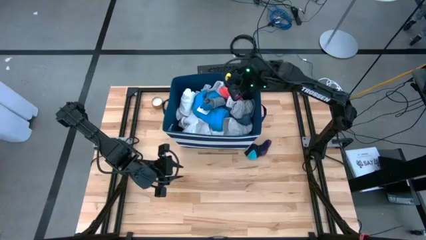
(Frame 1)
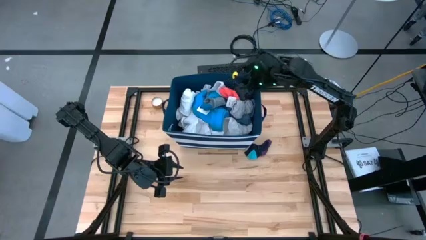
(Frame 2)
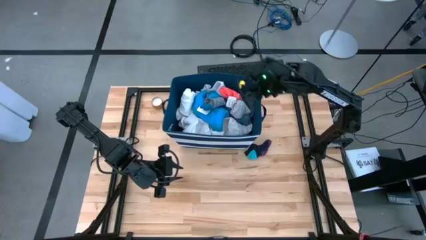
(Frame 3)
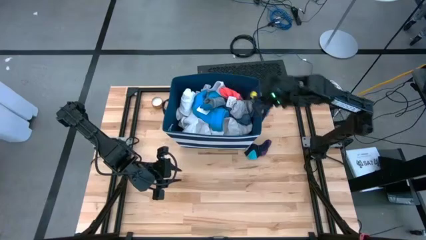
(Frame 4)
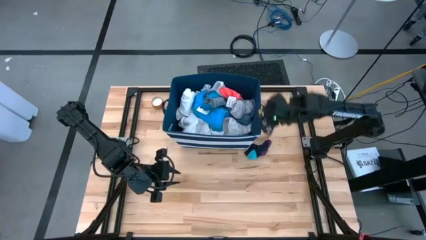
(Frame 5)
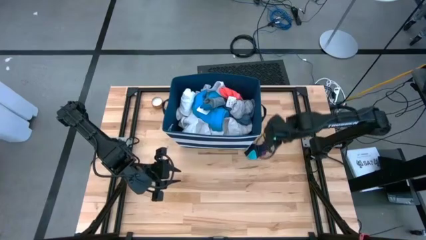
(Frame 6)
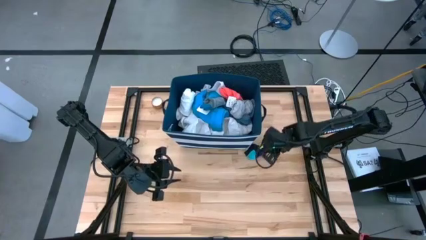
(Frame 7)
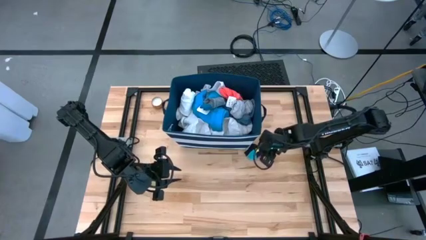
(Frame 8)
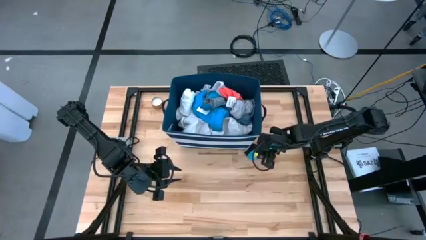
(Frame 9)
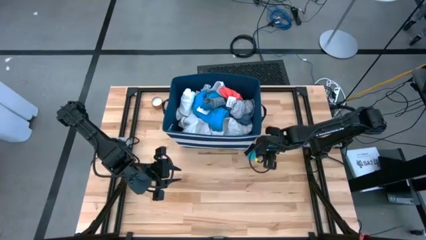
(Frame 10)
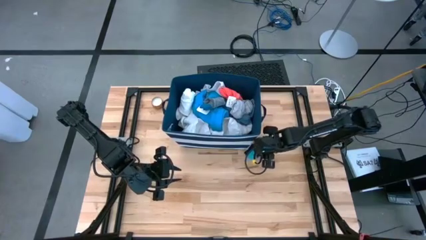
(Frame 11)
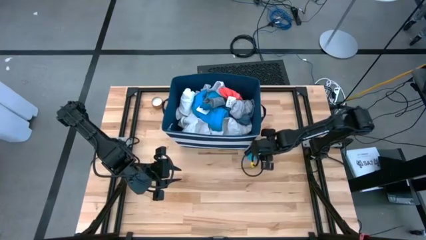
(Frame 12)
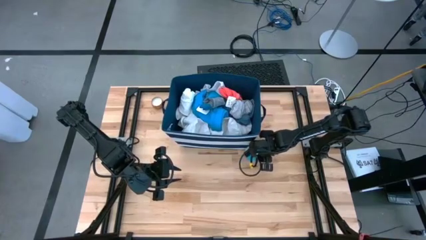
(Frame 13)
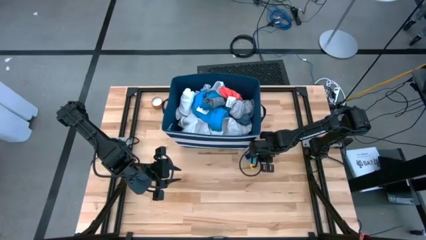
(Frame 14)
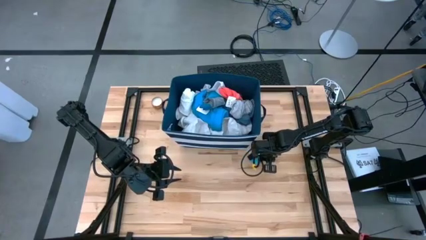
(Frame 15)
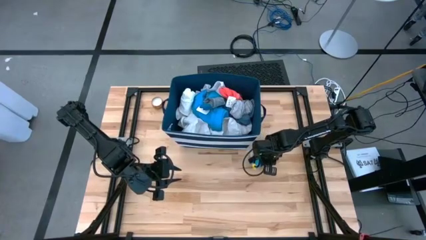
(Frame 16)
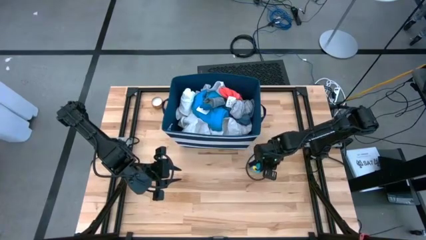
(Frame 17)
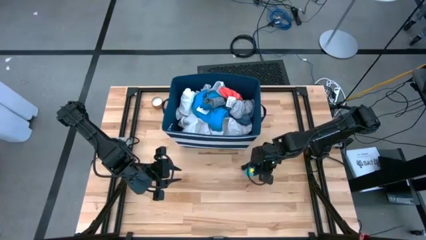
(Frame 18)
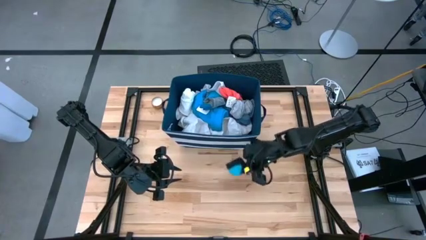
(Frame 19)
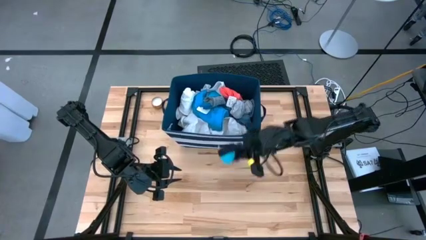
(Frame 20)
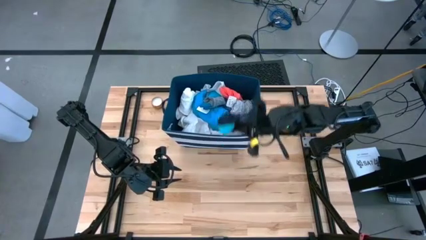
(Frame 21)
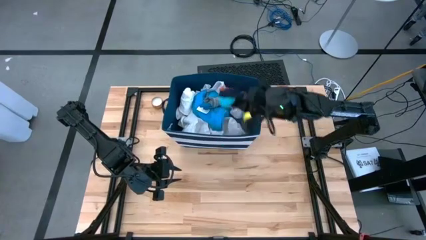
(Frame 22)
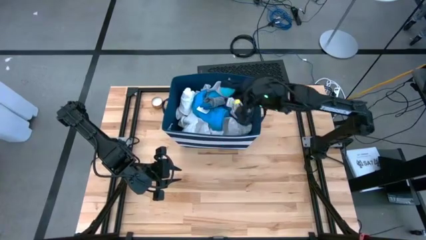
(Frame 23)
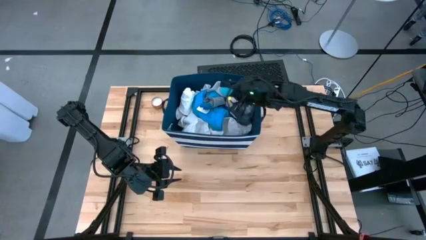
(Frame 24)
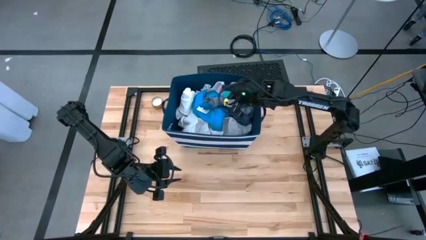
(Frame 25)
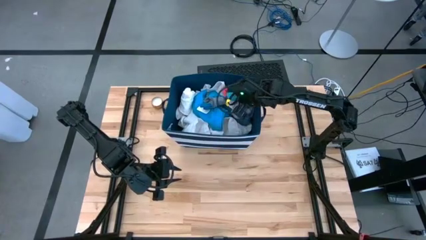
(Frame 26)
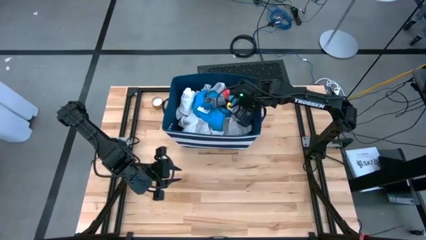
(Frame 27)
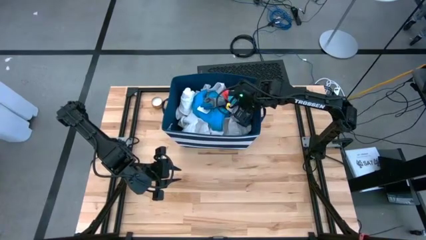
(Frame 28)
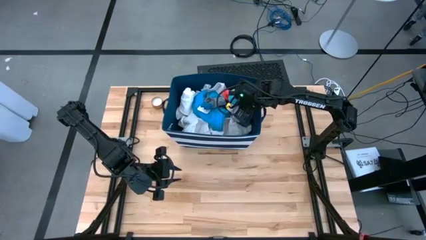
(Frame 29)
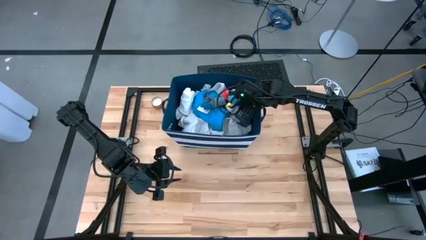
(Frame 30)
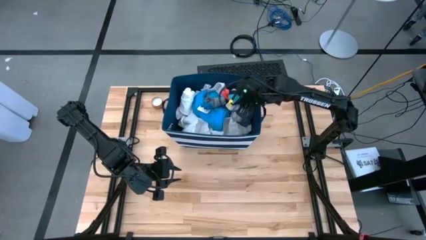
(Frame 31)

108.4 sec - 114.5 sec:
Task: Sort clothes
Put the dark blue sock into the white and blue laundry organizer

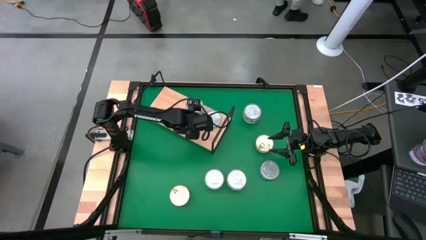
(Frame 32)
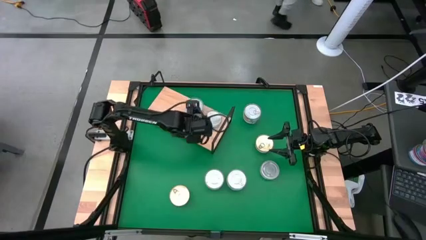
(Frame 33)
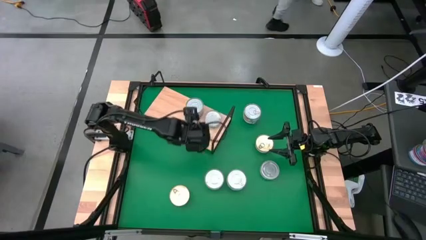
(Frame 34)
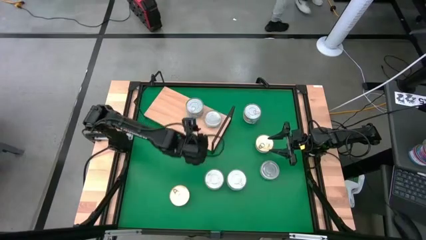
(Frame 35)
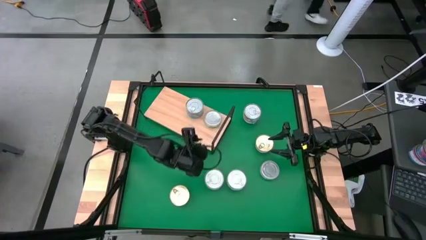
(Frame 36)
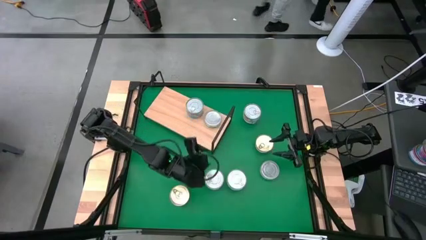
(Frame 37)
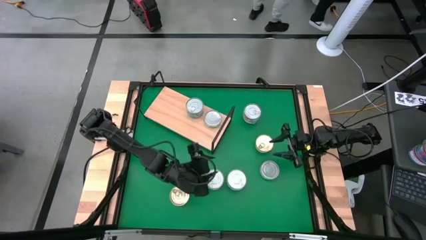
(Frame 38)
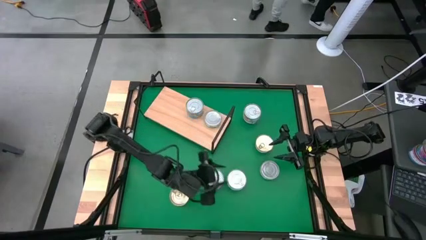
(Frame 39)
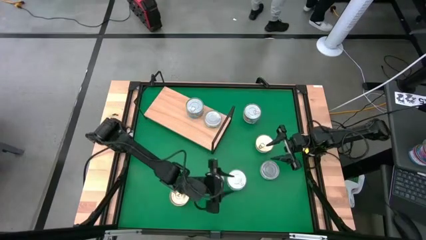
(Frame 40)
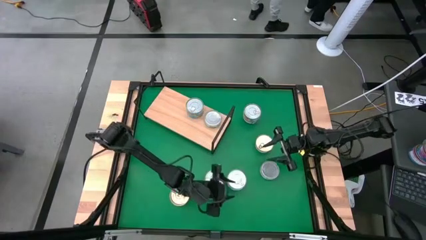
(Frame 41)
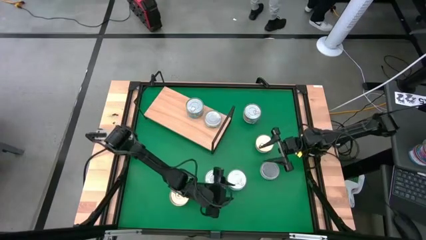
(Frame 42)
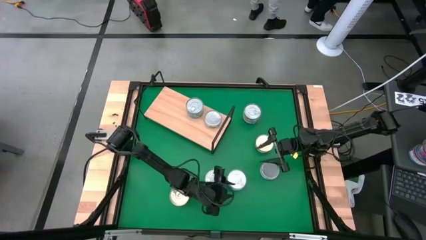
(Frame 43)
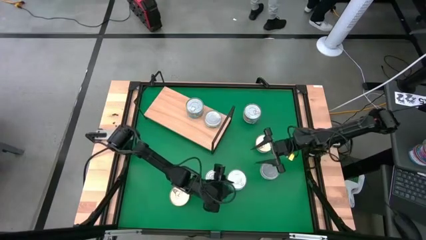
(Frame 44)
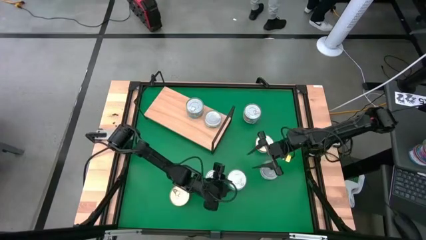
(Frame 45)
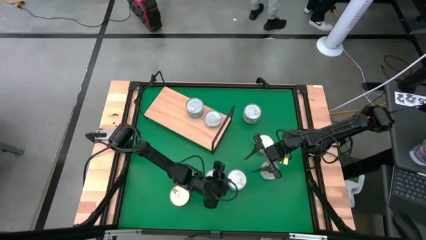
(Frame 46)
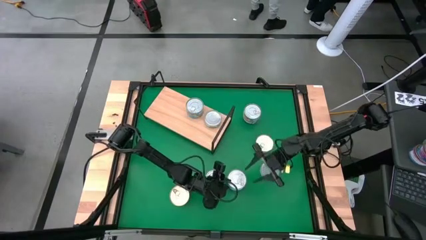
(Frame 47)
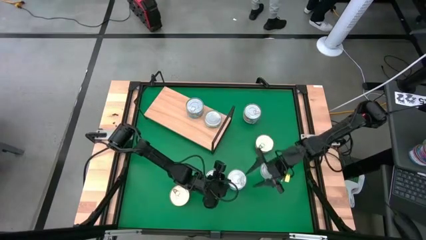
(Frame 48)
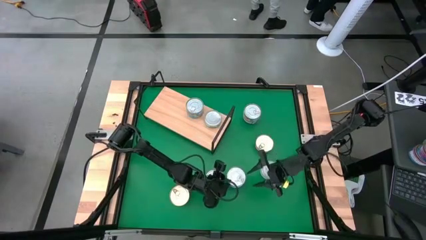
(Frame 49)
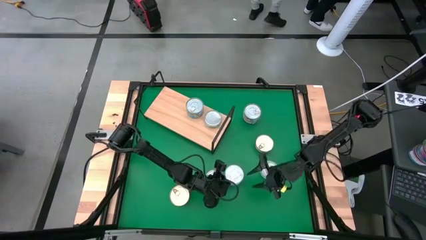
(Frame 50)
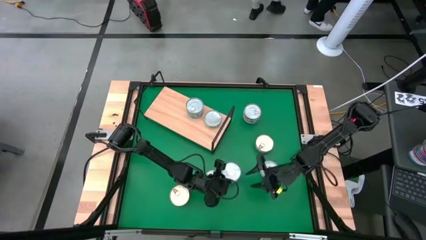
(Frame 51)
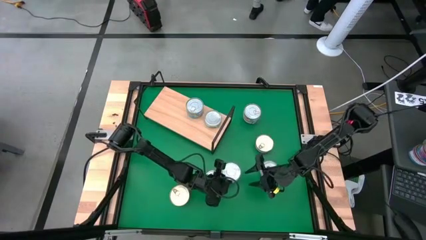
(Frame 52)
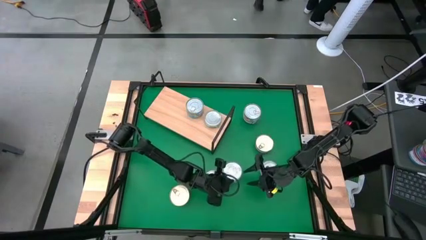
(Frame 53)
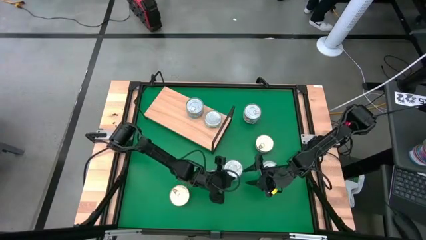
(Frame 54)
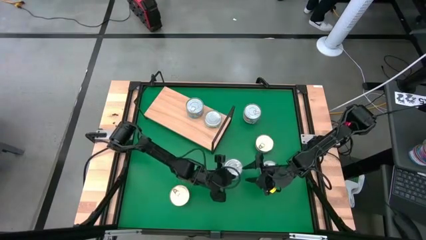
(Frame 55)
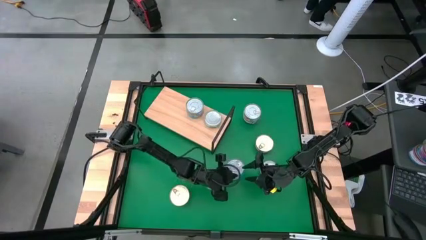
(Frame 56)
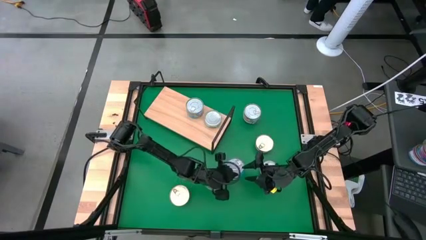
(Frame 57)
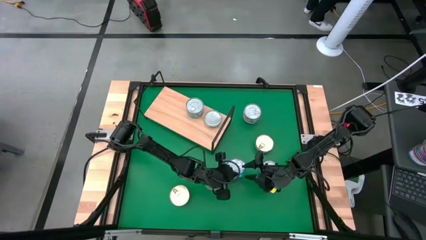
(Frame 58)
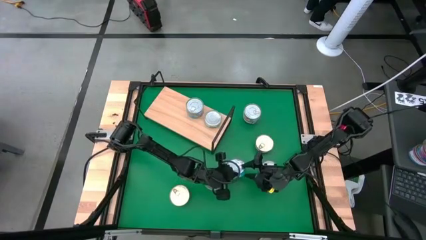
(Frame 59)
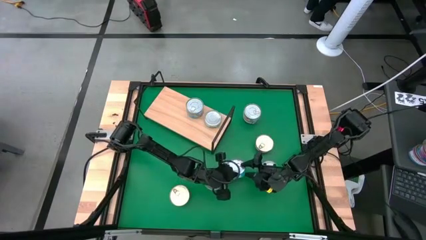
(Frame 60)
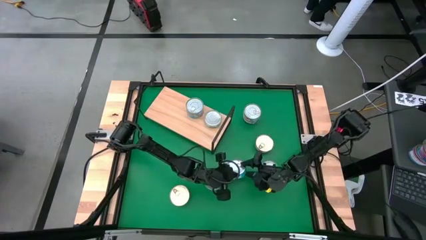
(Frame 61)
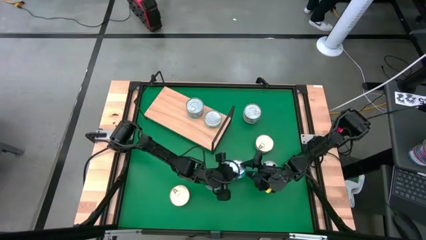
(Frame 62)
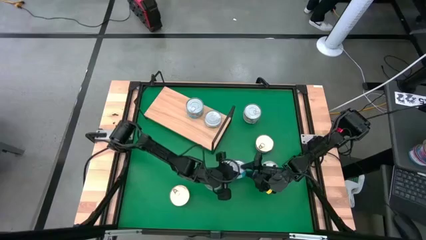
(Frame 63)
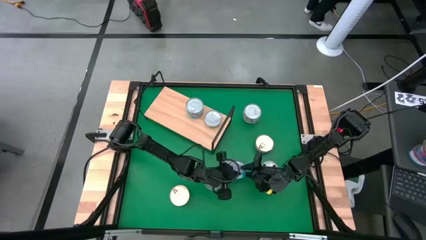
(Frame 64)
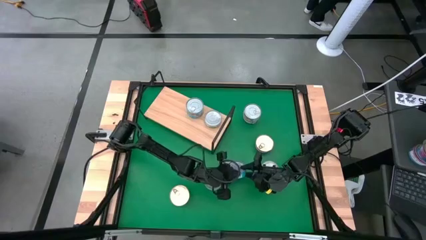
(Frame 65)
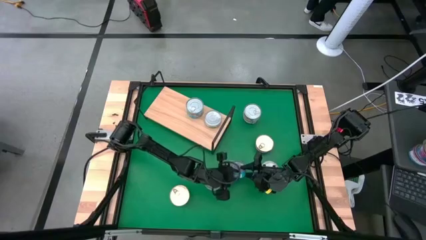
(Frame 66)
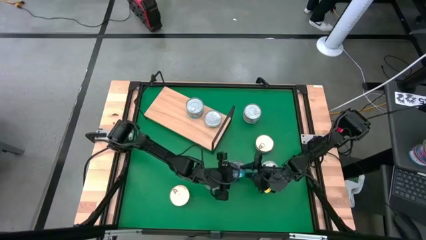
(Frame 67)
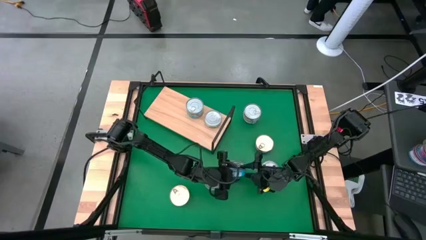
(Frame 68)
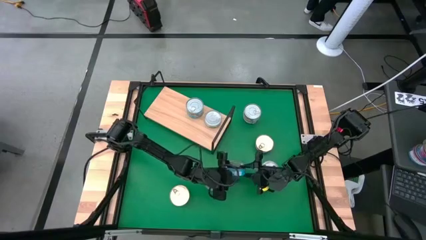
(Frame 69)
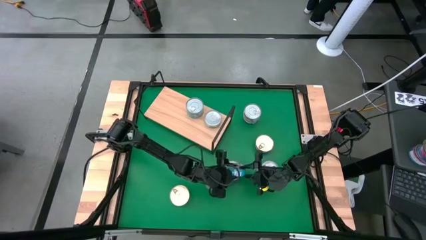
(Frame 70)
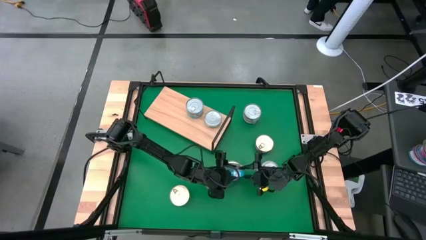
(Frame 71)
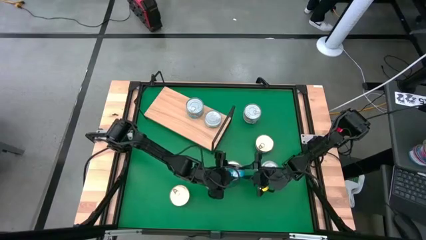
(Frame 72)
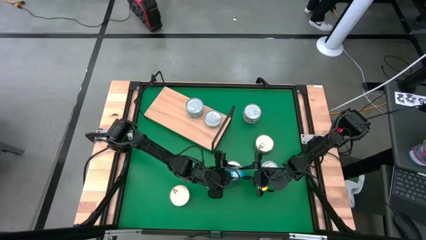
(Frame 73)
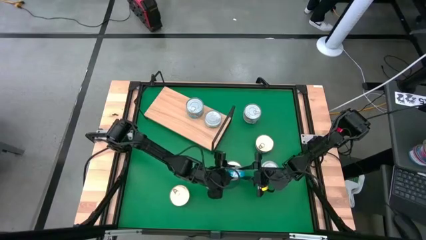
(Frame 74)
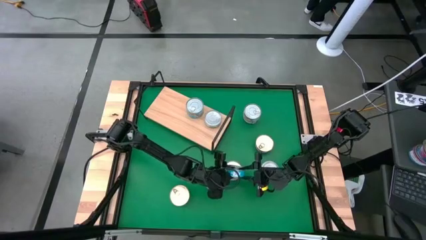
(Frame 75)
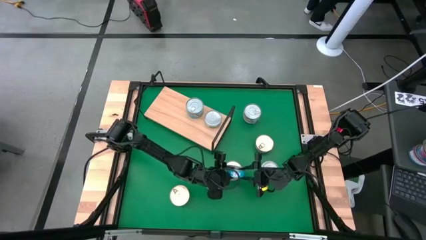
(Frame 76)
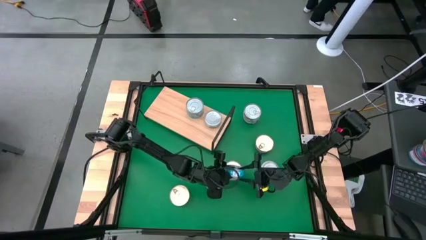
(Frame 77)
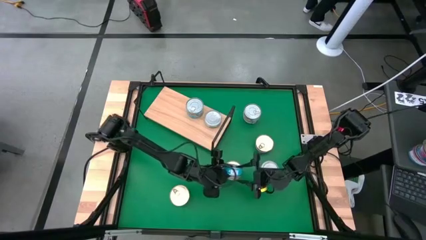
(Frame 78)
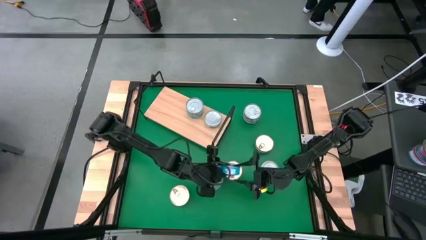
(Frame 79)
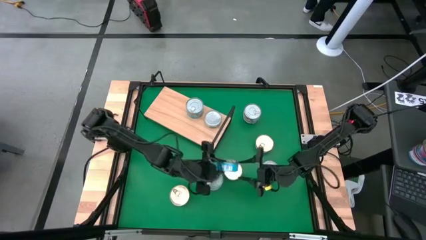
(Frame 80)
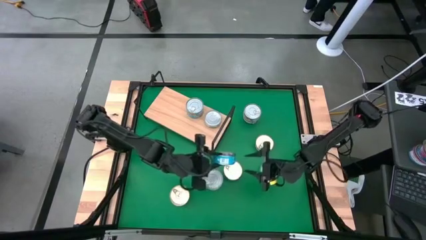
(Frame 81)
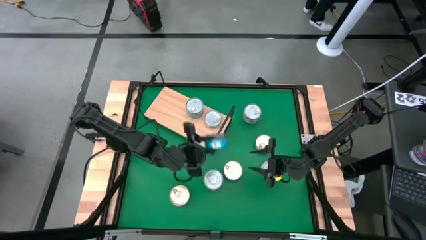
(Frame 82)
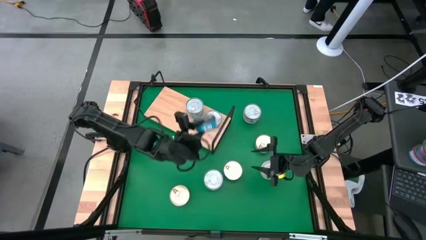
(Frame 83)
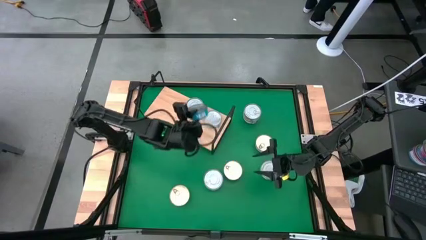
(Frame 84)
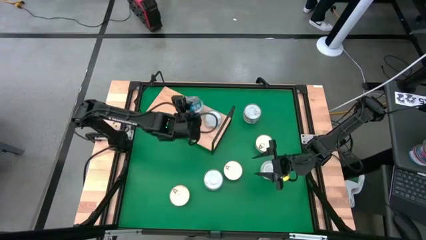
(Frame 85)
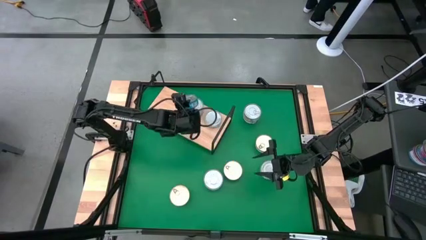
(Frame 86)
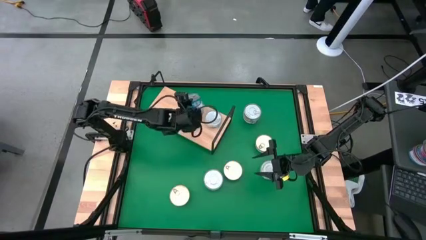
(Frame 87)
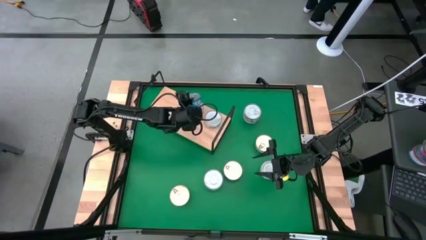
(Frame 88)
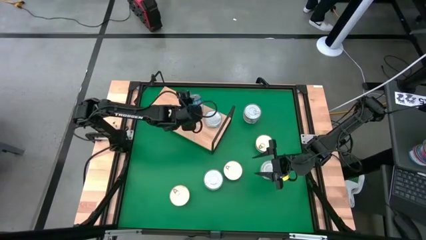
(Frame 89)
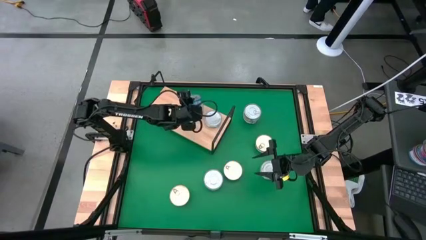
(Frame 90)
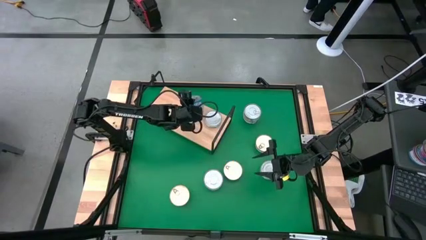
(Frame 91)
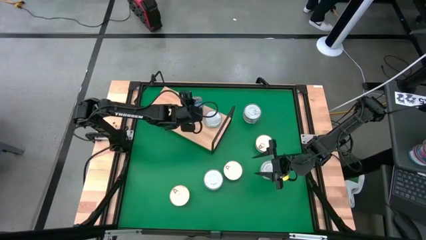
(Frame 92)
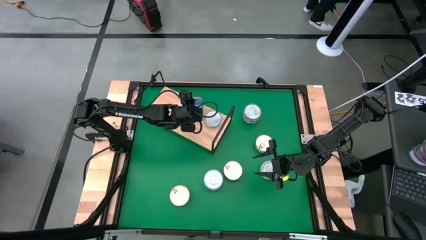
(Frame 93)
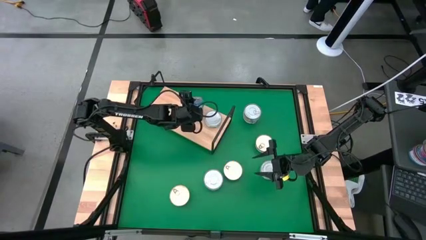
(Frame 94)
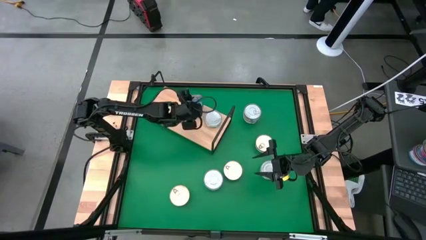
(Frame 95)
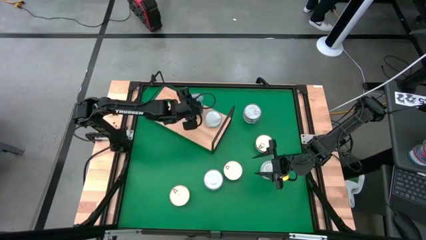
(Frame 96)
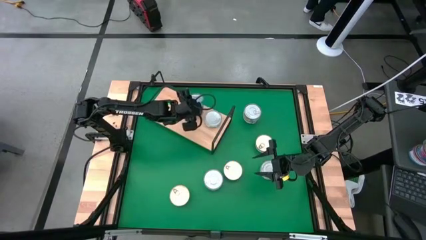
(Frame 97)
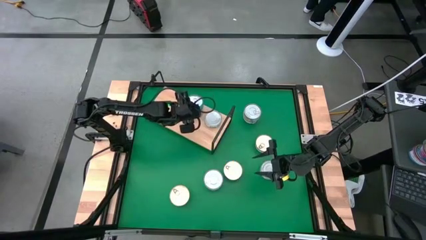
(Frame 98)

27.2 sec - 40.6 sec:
Task: Stack canned seafood by type on shelf
Stack the sky blue tuna can on top of the sky blue tuna can
